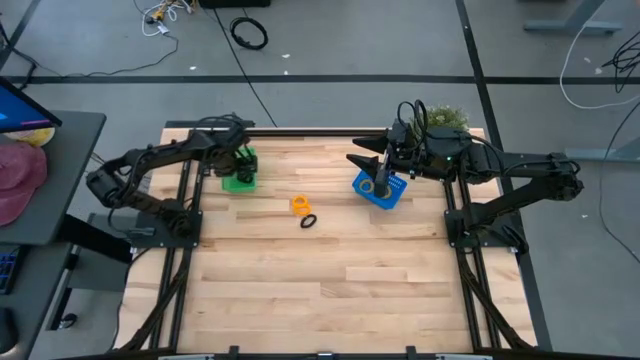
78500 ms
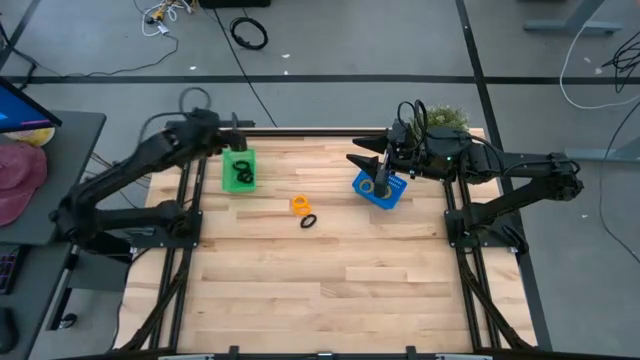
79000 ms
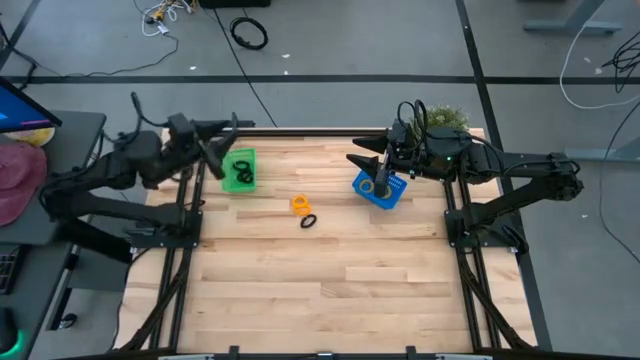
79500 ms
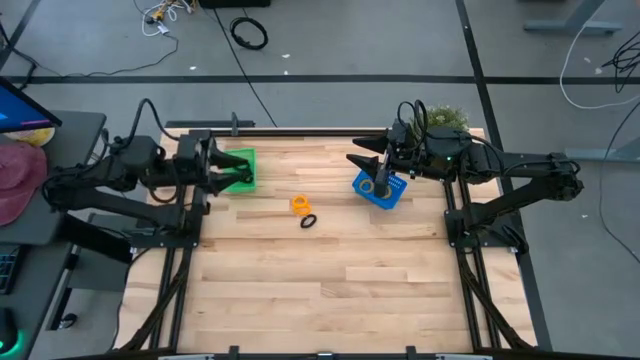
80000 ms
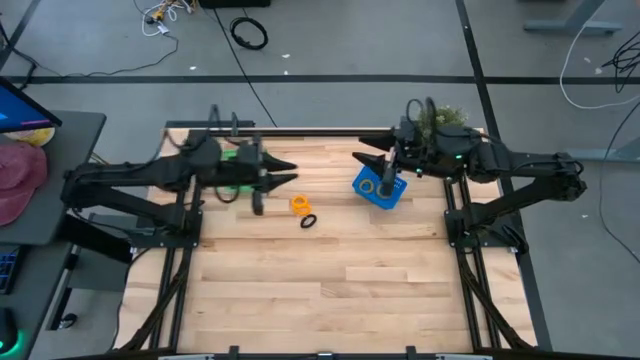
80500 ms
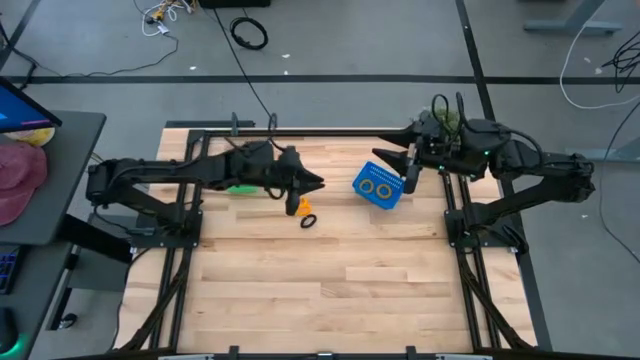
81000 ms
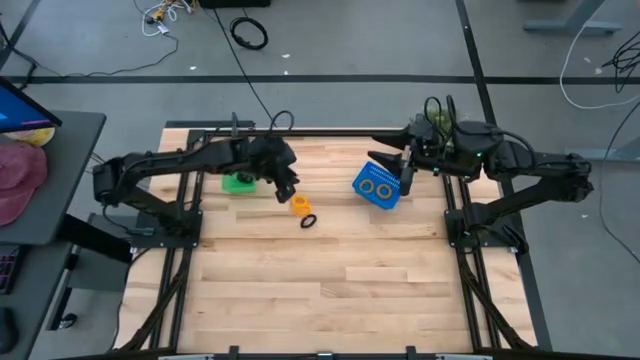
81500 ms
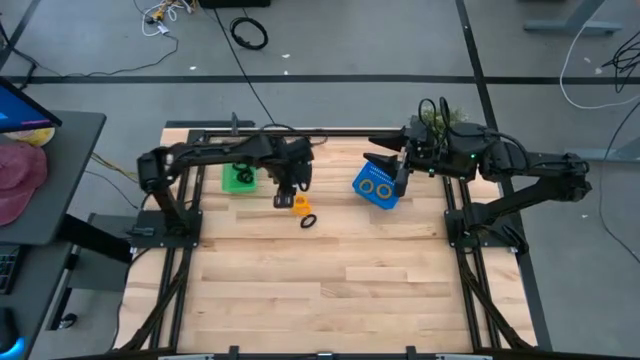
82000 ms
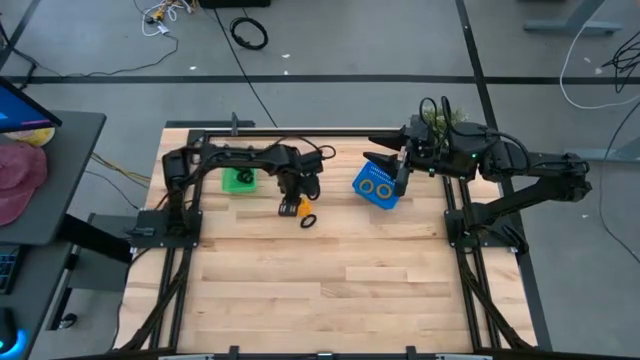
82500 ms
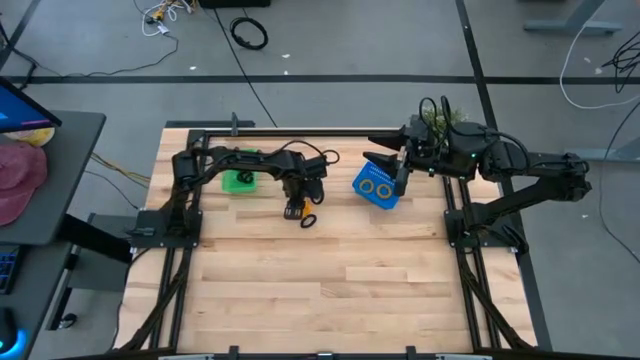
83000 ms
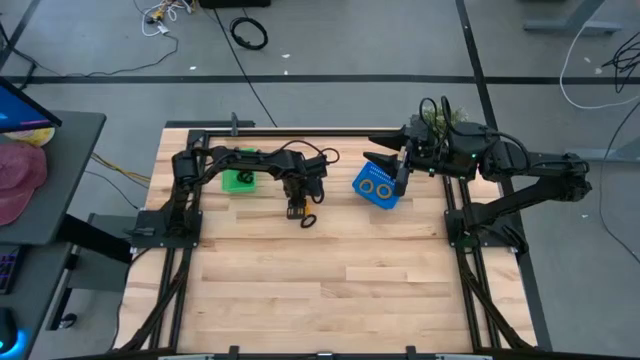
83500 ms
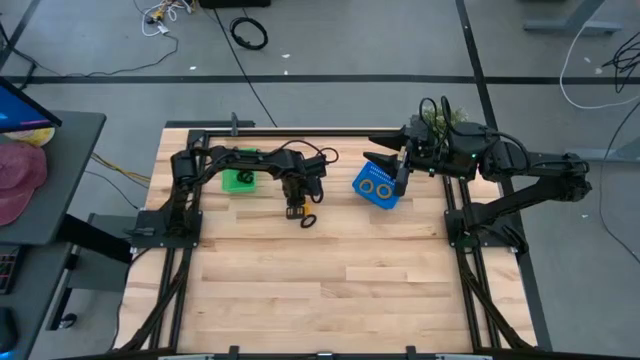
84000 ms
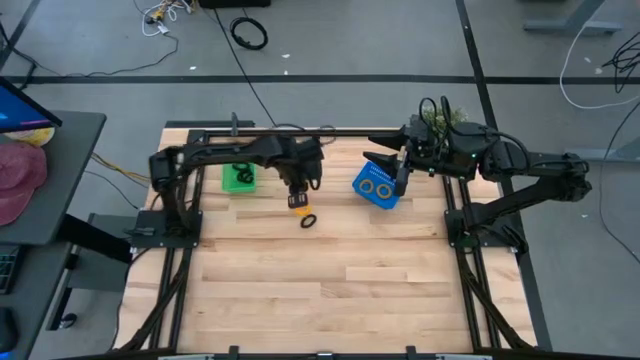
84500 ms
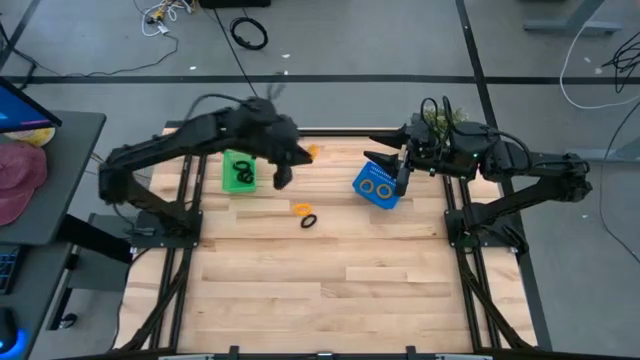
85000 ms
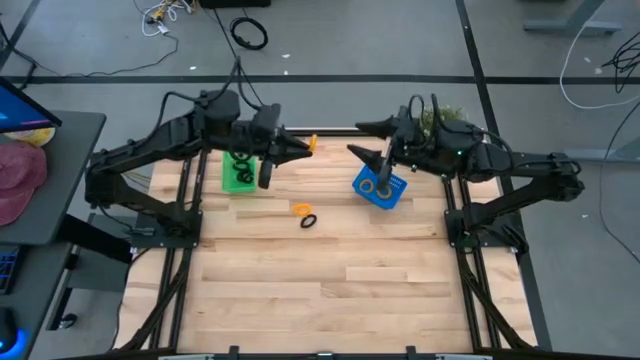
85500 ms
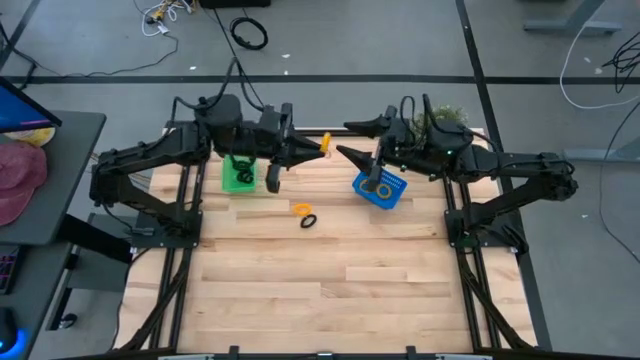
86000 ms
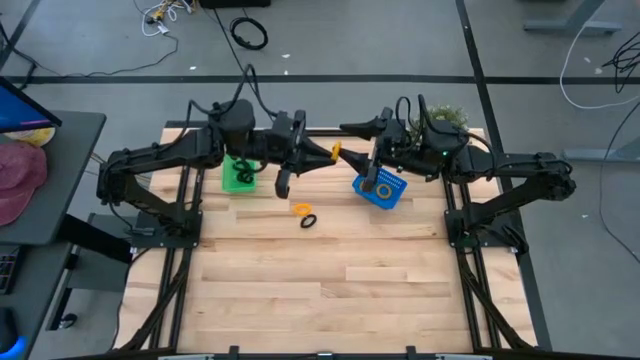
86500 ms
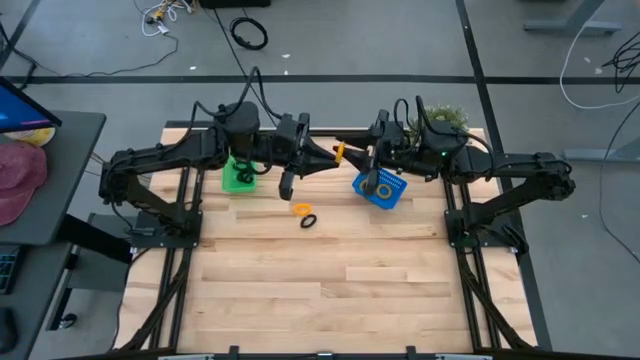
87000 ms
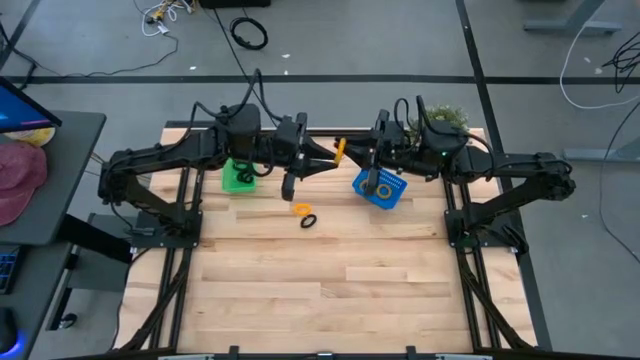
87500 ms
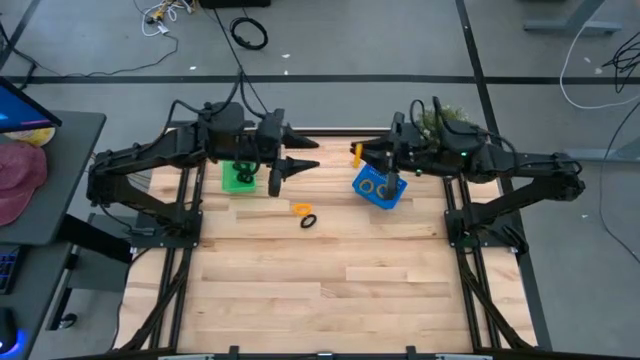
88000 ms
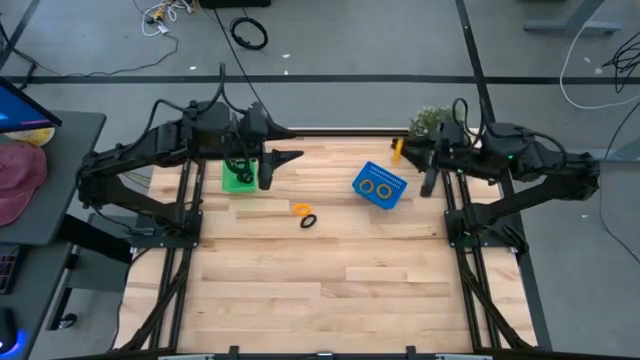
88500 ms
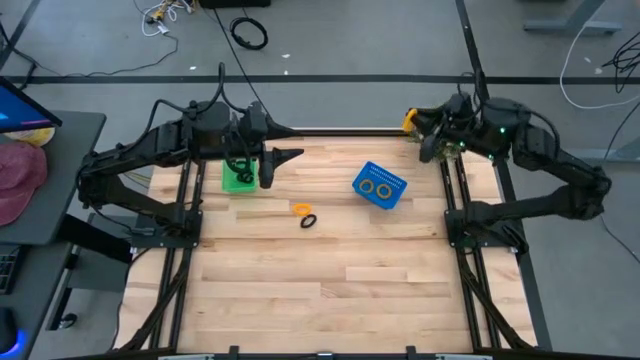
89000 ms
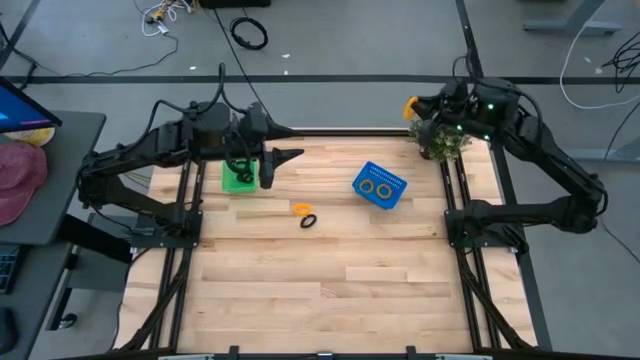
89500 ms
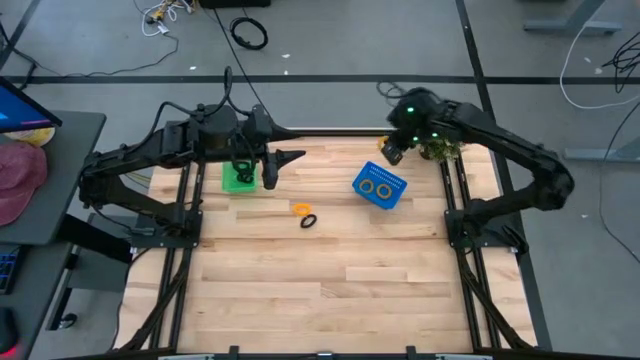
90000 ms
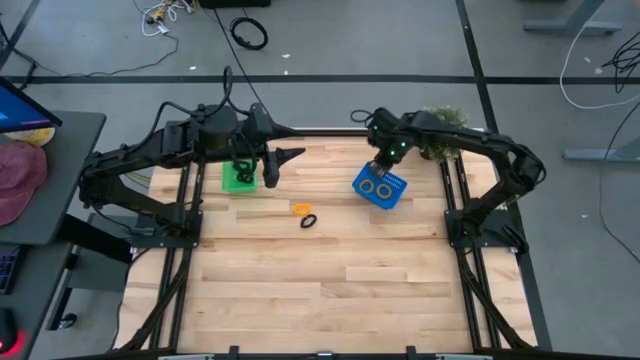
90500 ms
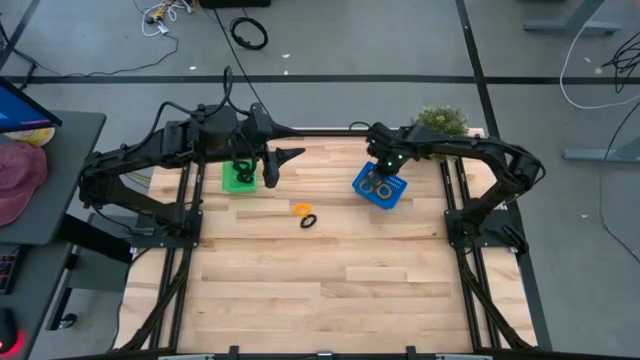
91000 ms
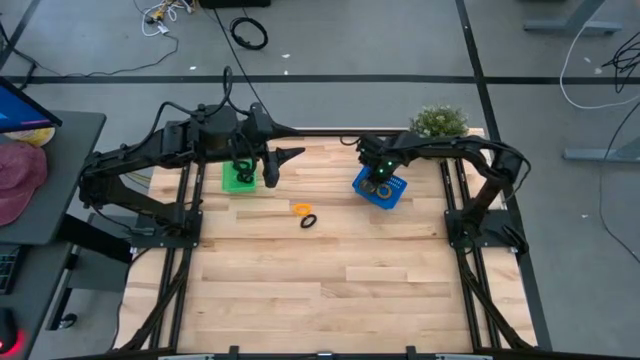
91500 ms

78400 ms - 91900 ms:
Task: Sort spring keychains
Put the yellow spring keychain into the blue bin

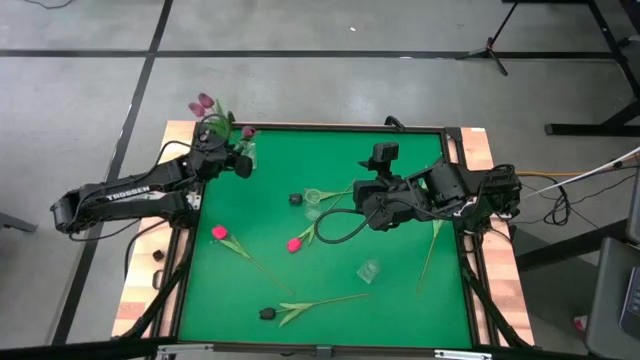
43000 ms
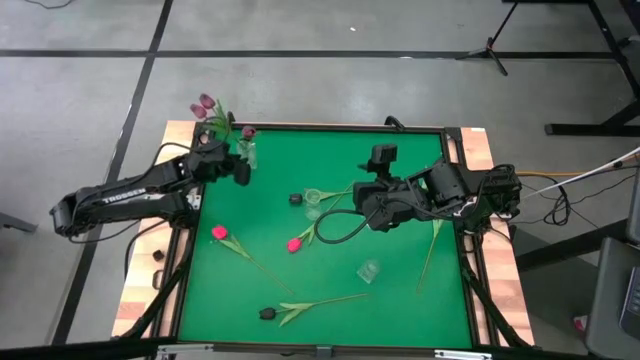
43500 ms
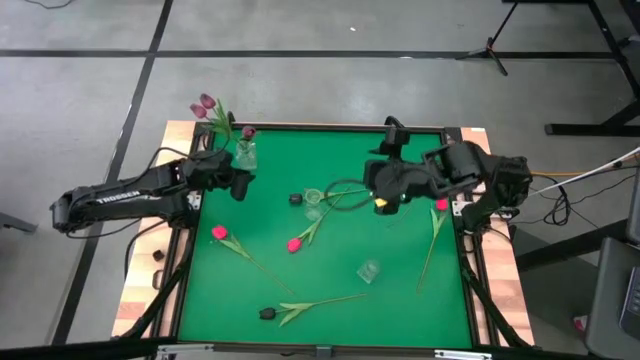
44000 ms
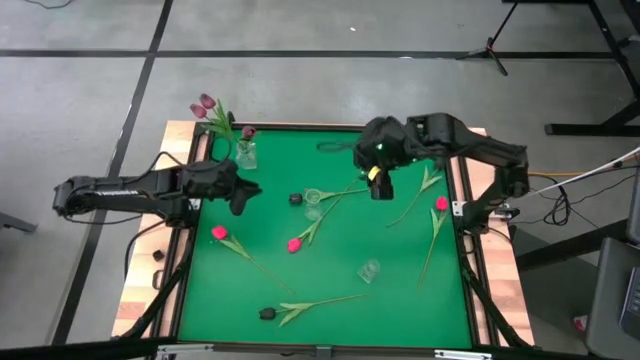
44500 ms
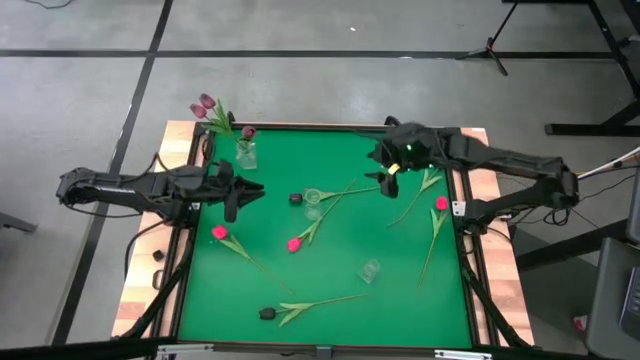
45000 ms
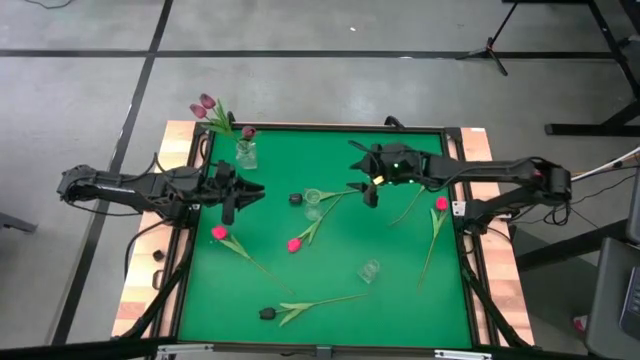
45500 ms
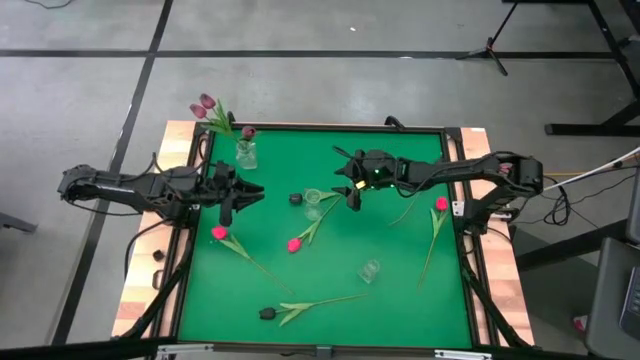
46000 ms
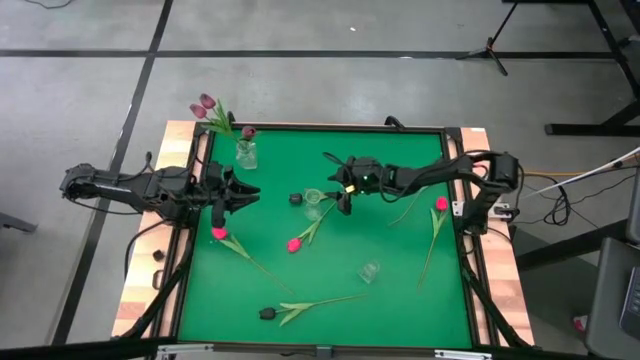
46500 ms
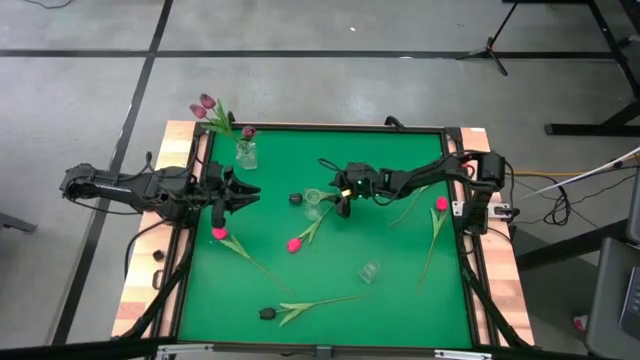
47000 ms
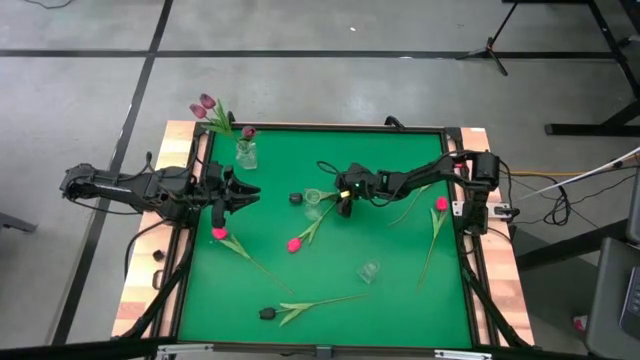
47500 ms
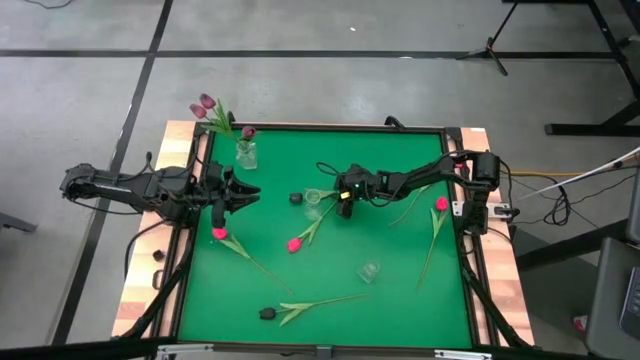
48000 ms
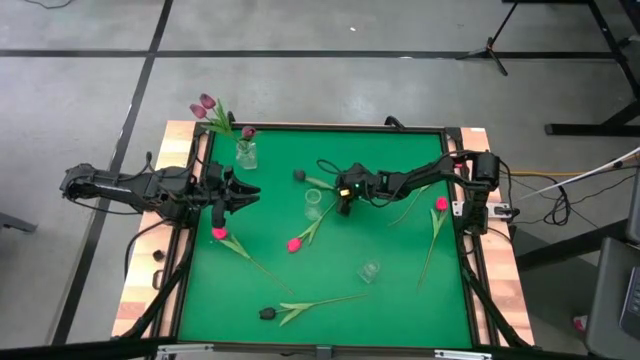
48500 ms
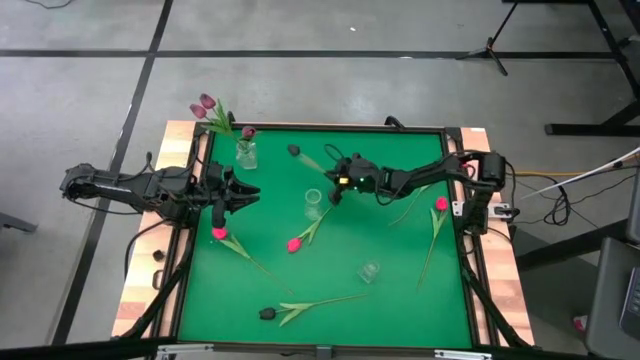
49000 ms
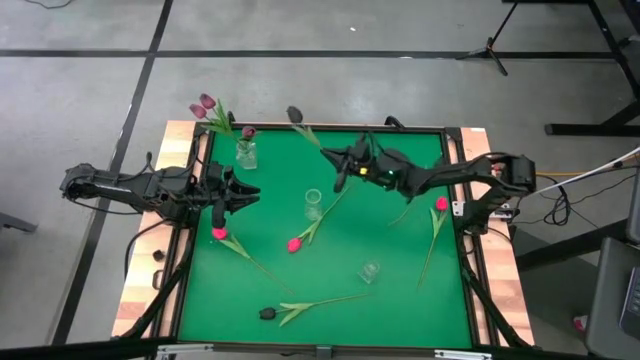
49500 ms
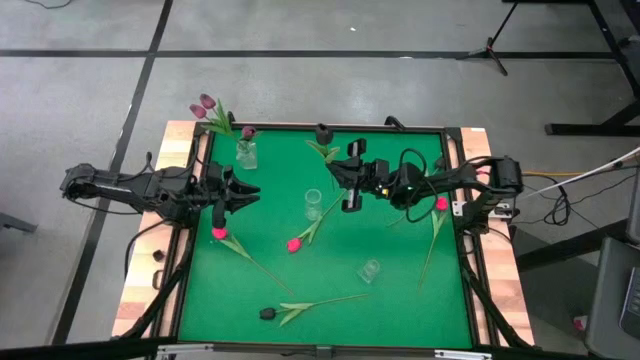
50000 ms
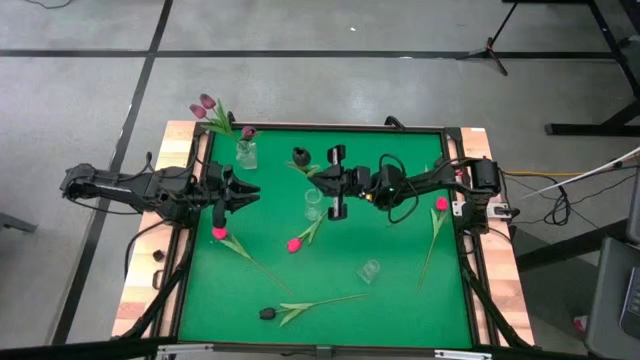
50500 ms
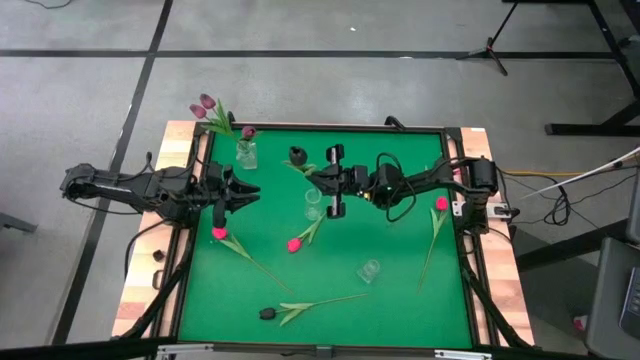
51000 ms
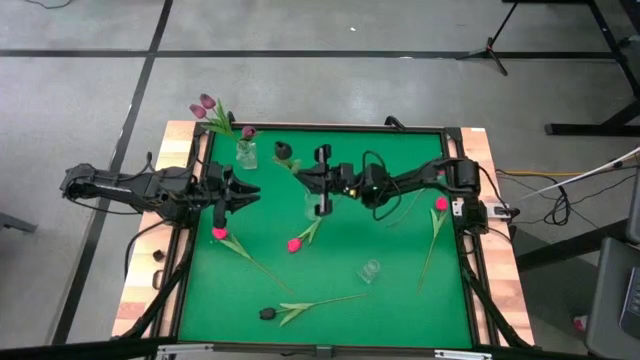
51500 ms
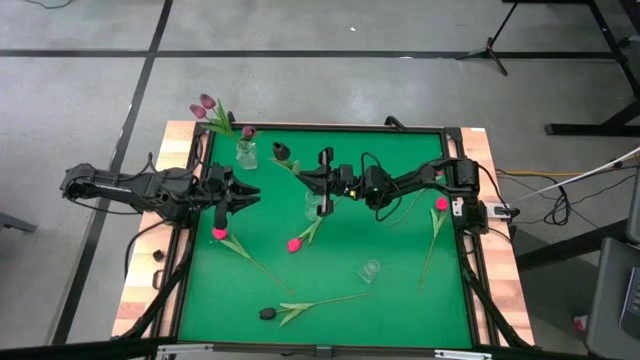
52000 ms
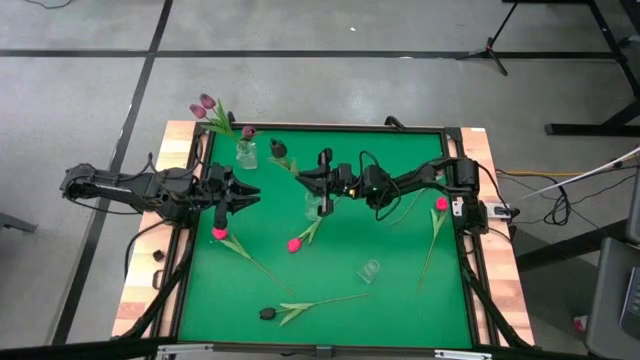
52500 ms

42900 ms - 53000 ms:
Task: Sort flowers into vase by color
Put the top left black tulip into the center transparent vase
